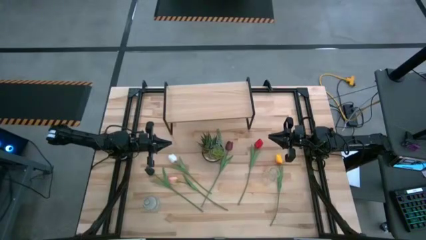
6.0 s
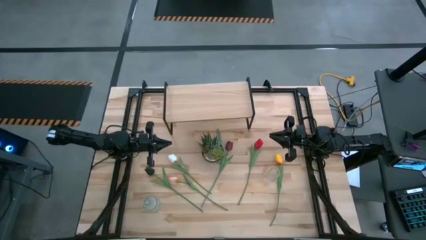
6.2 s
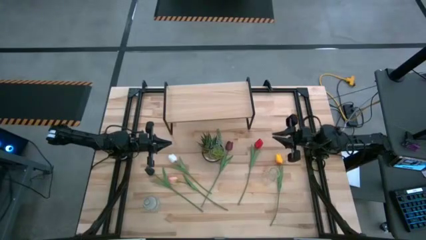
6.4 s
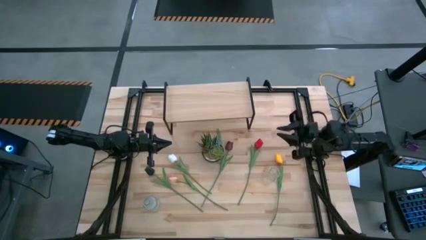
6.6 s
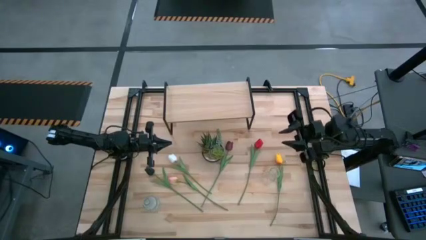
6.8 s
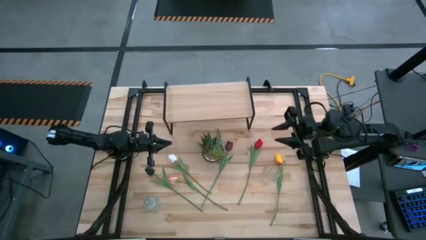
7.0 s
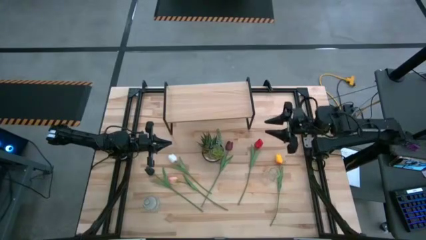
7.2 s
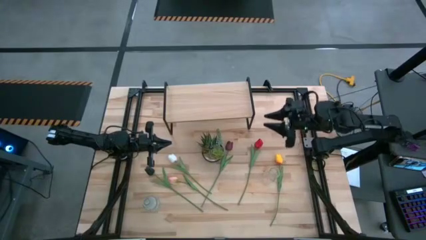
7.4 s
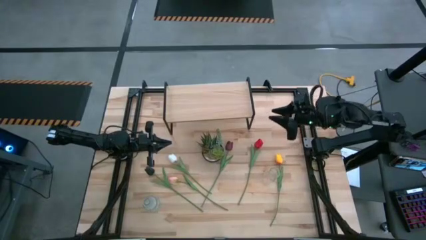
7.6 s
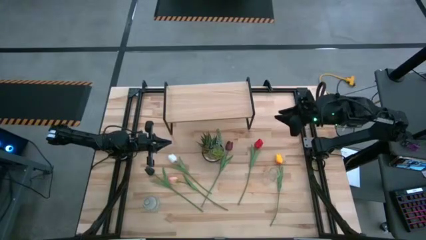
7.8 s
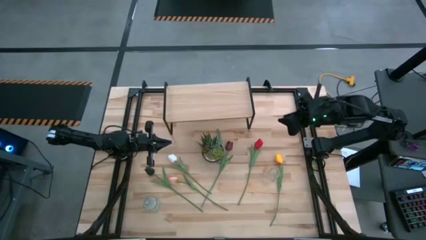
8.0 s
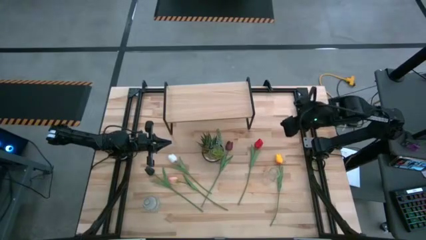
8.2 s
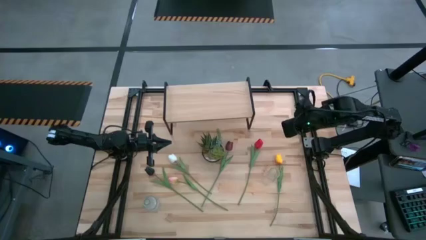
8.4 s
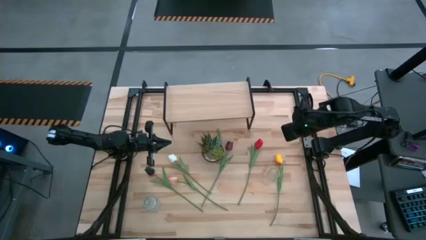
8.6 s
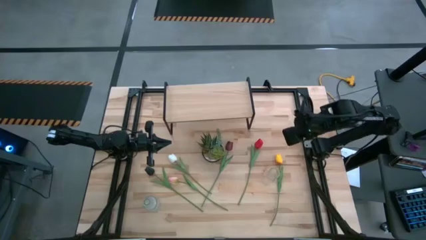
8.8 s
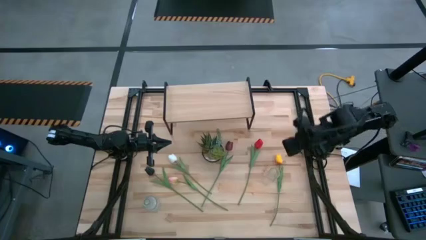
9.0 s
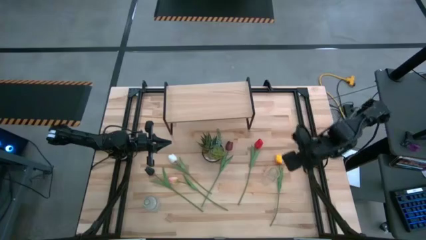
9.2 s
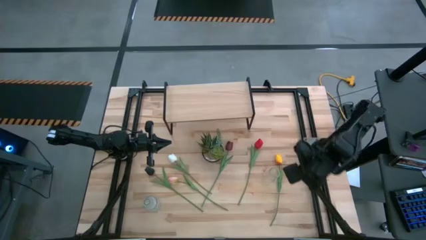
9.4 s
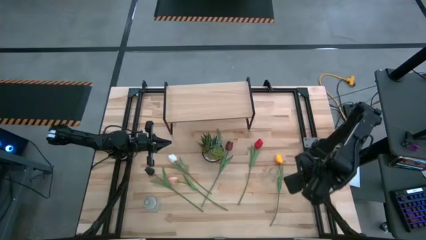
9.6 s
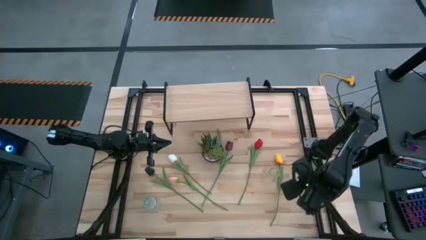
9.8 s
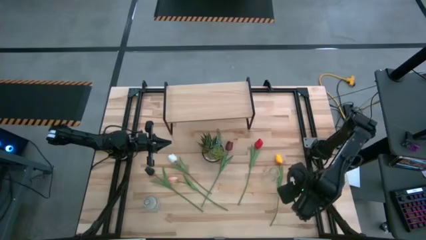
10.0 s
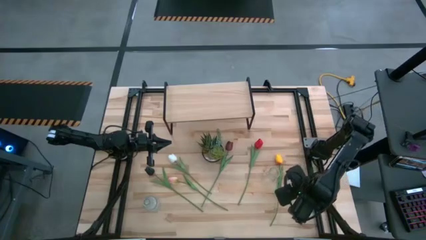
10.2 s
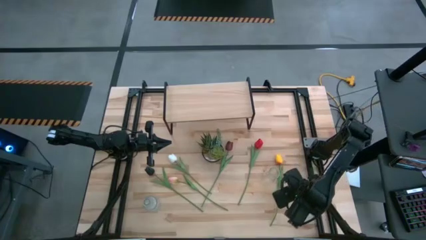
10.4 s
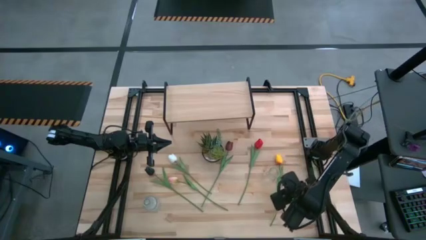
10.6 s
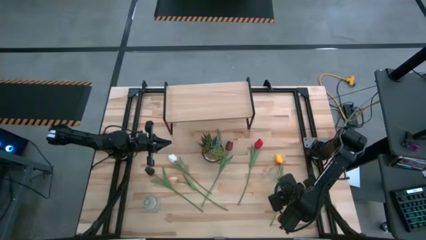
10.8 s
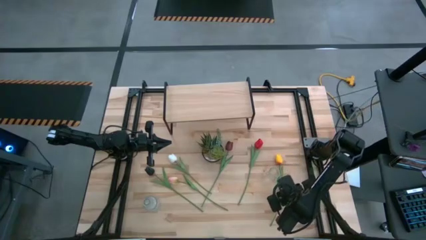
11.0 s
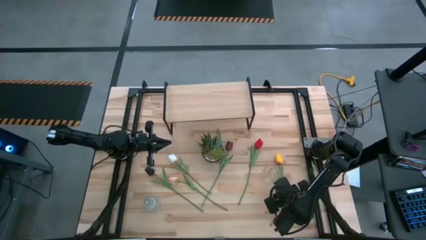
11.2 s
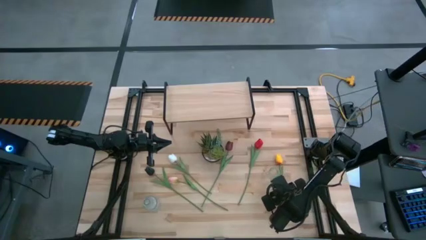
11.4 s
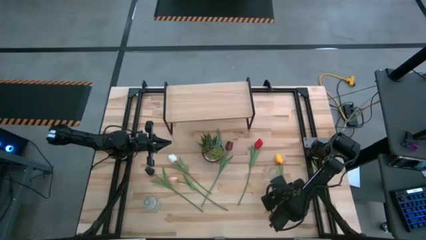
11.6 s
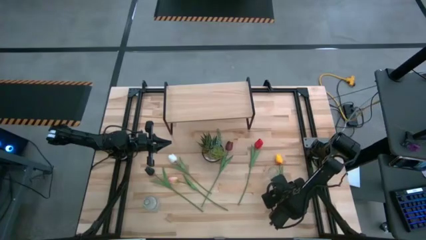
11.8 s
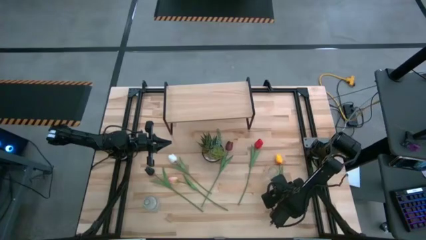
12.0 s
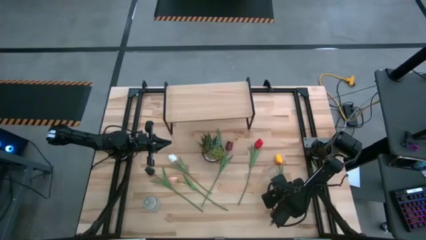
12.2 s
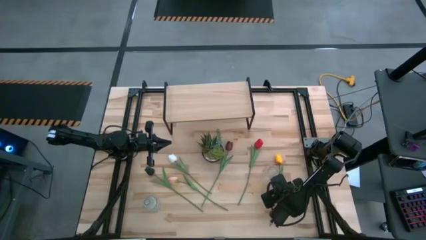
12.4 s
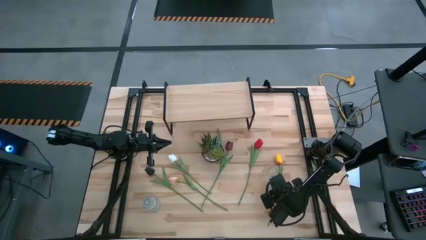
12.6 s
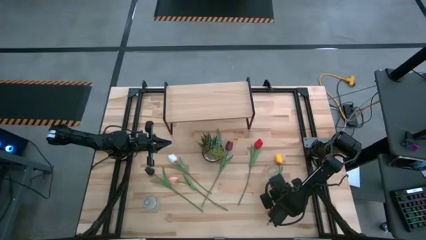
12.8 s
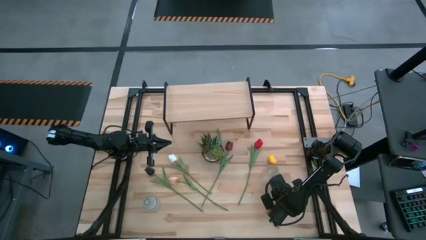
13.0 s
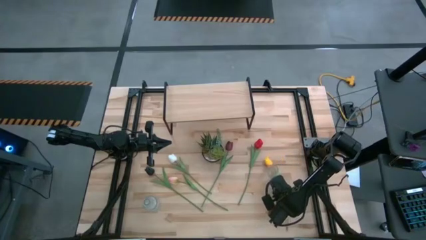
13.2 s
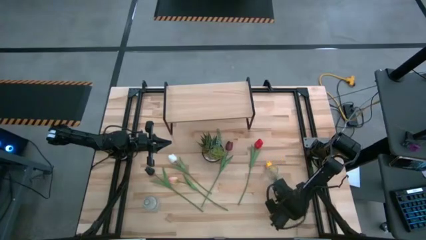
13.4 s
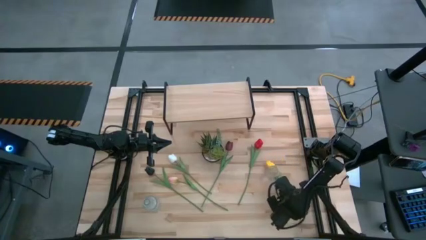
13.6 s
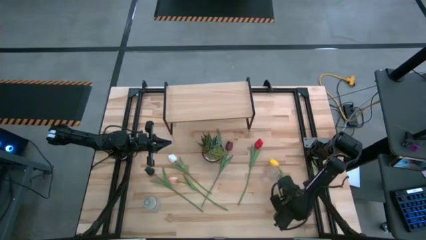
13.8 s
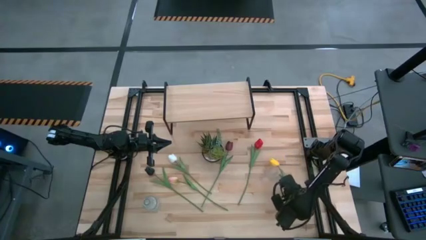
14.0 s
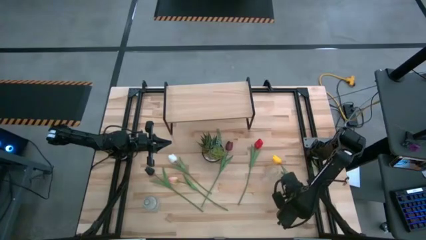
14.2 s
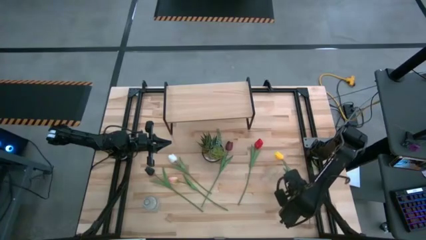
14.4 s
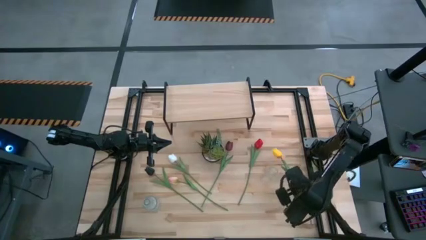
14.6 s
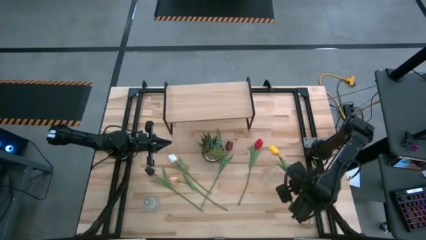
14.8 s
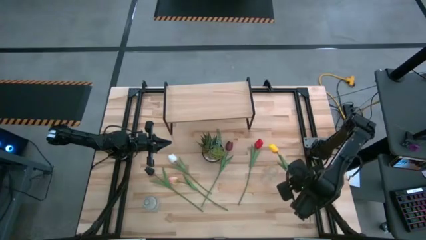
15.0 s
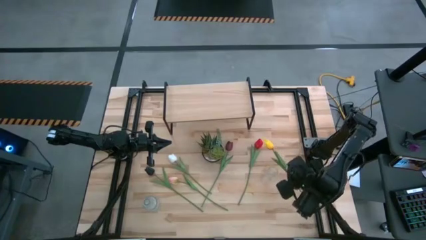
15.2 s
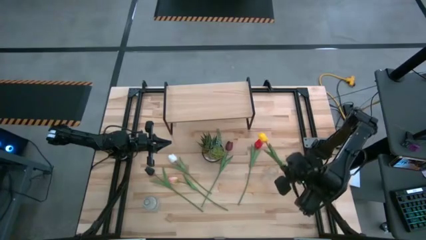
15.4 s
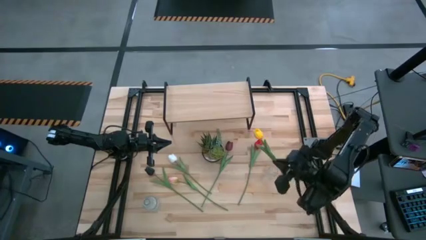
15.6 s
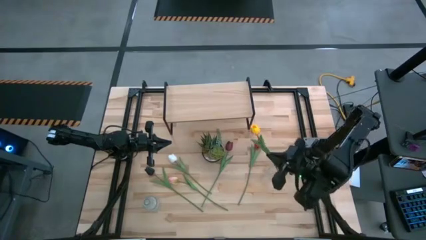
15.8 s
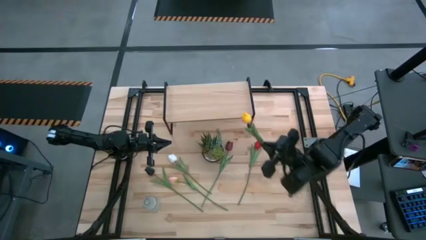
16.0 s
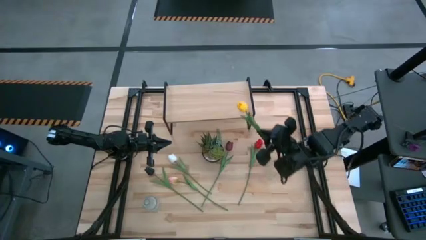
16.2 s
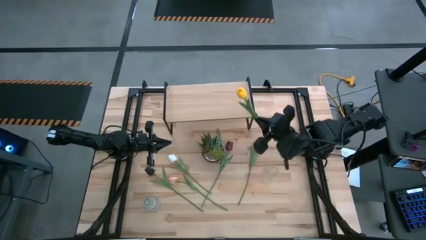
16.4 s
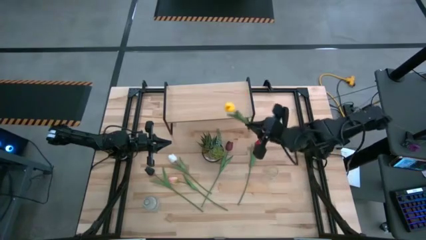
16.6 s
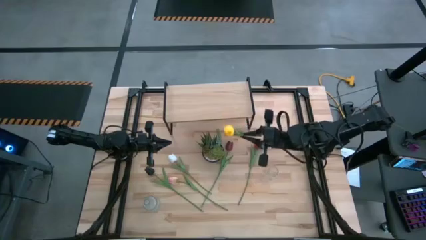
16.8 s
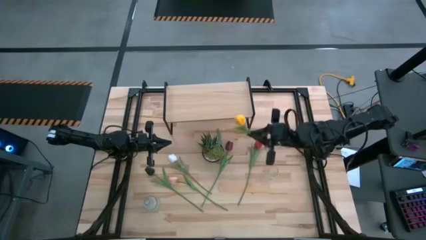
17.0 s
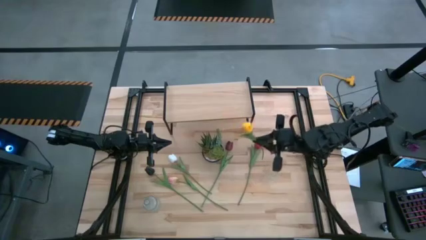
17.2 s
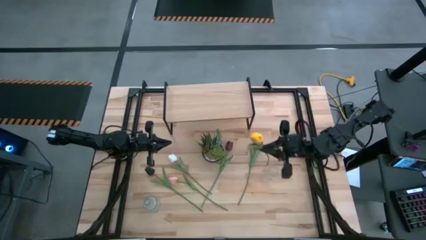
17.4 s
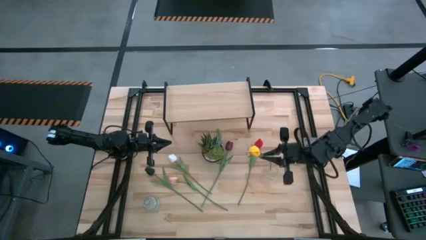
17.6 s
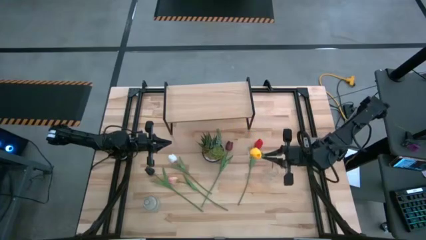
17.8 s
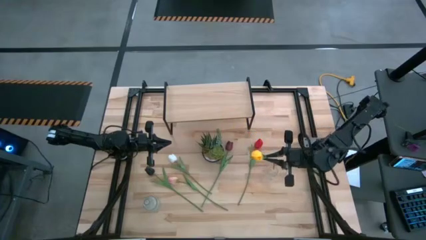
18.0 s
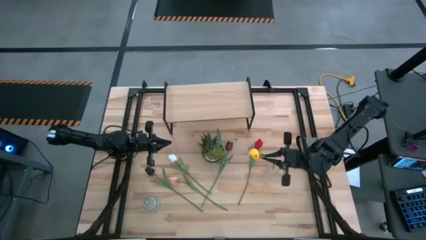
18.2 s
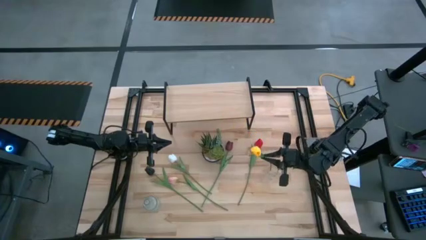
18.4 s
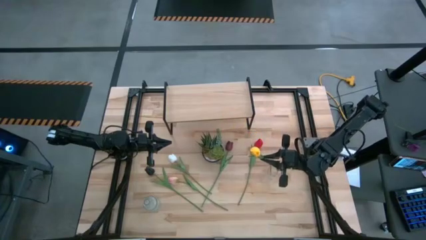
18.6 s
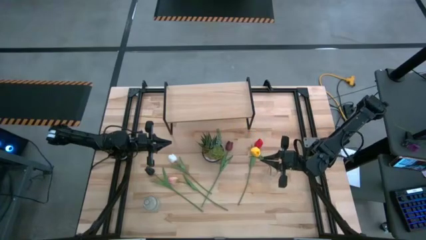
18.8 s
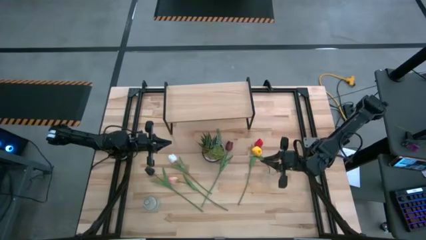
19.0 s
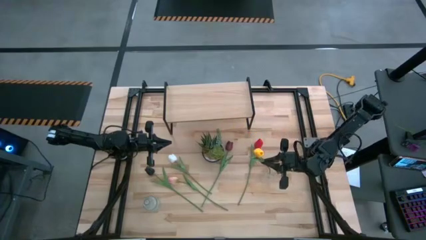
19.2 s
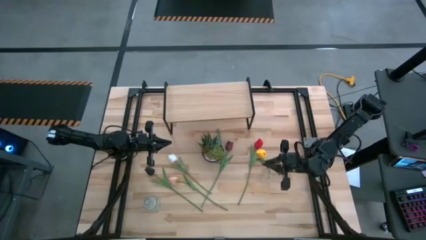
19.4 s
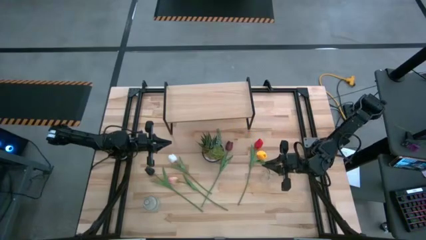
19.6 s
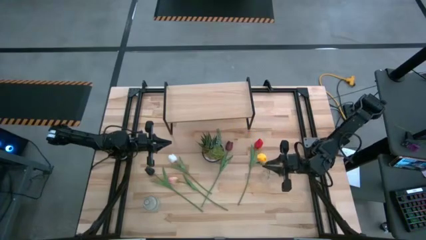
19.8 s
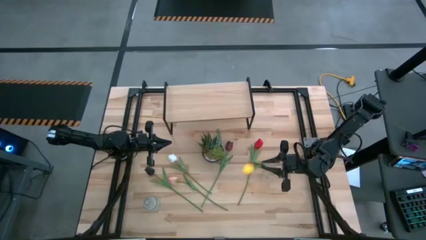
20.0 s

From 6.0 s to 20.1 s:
Task: Pick and place flowers into a vace then onto a shelf
Put the yellow flower into the right transparent vase
